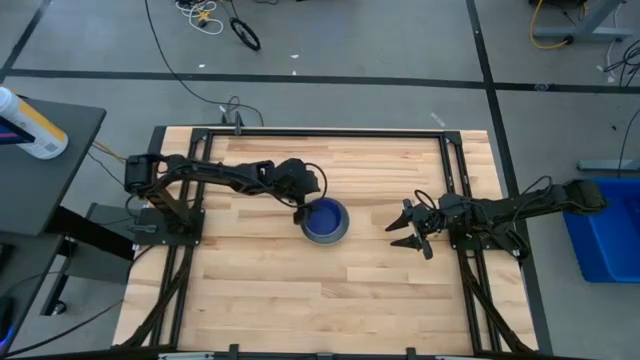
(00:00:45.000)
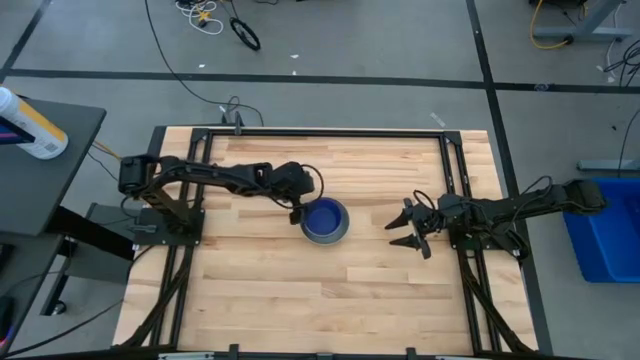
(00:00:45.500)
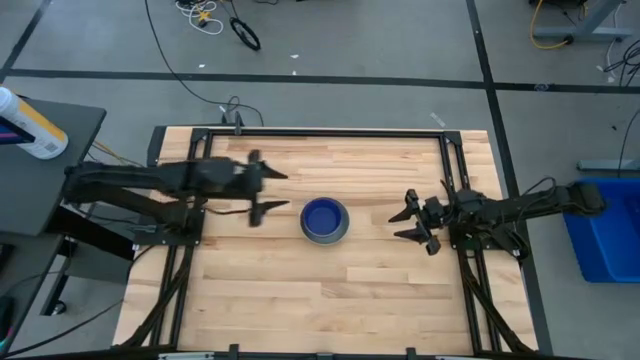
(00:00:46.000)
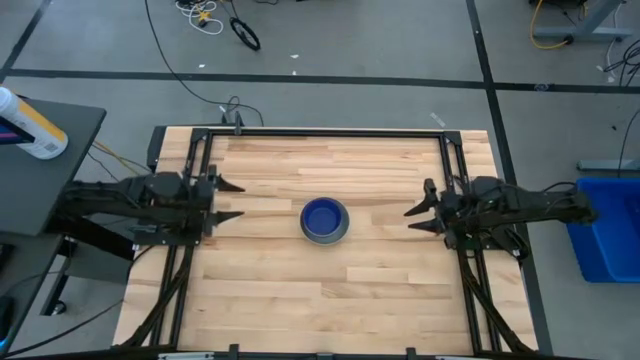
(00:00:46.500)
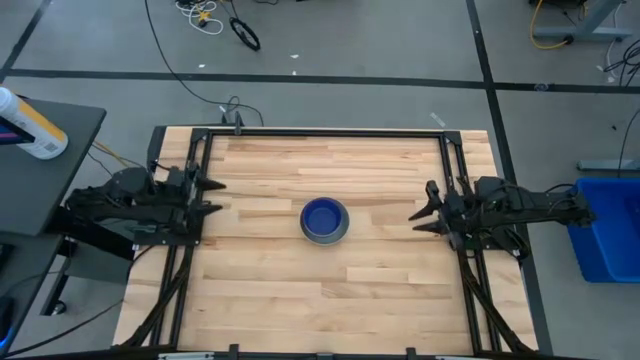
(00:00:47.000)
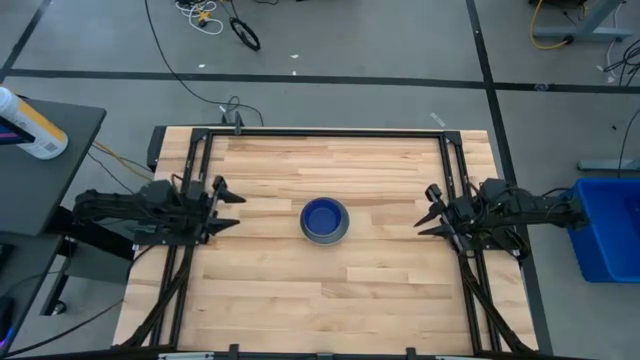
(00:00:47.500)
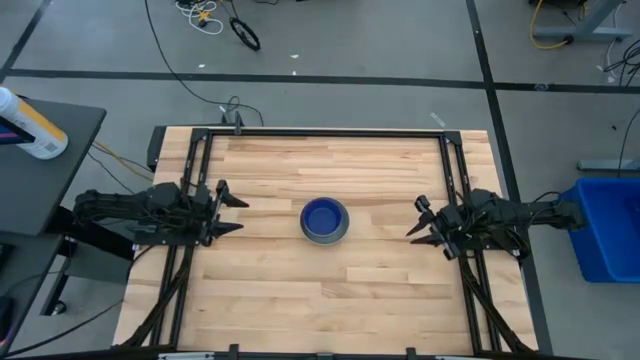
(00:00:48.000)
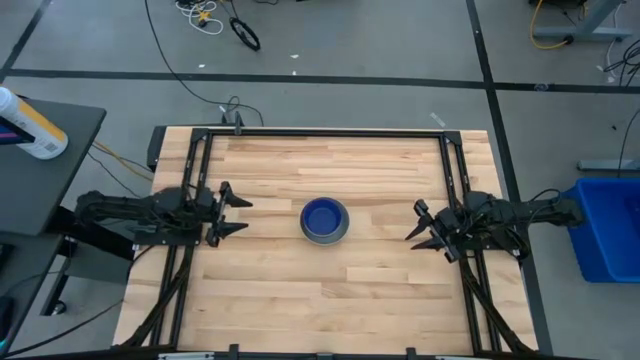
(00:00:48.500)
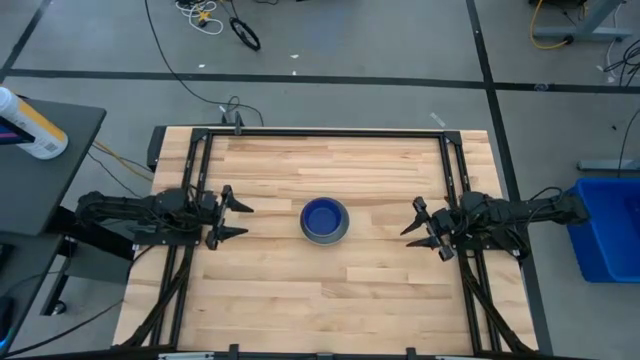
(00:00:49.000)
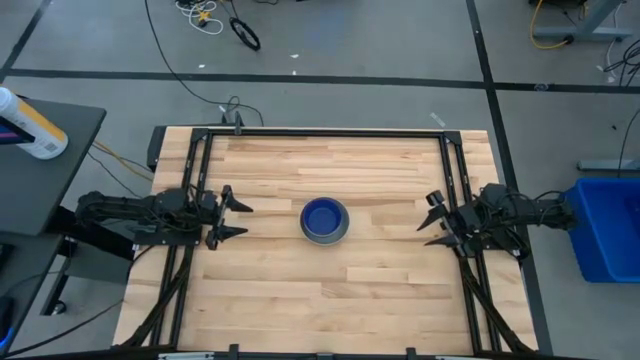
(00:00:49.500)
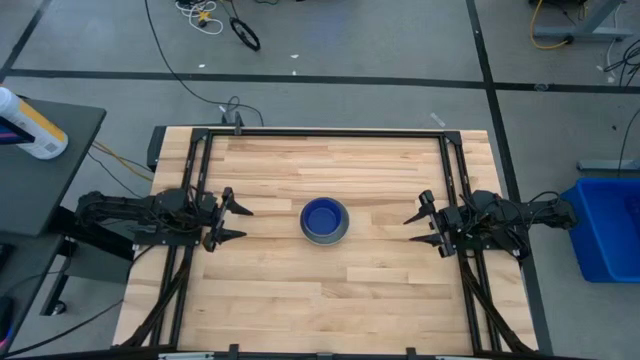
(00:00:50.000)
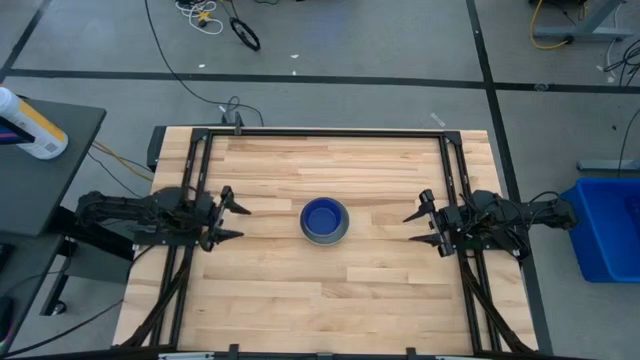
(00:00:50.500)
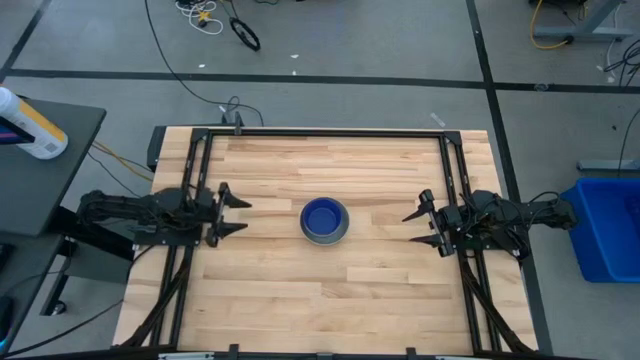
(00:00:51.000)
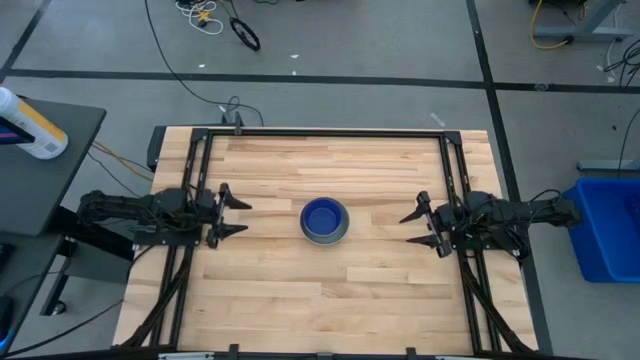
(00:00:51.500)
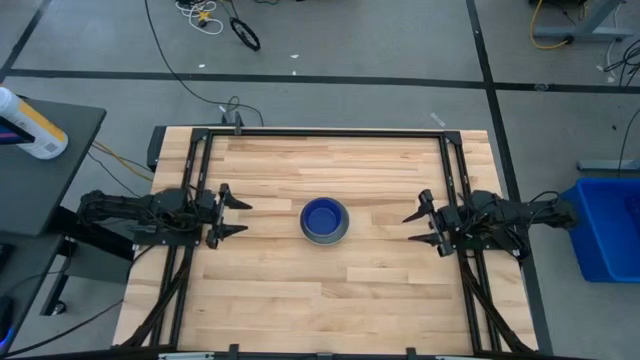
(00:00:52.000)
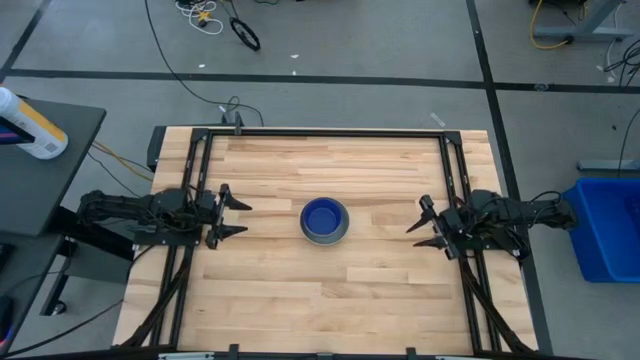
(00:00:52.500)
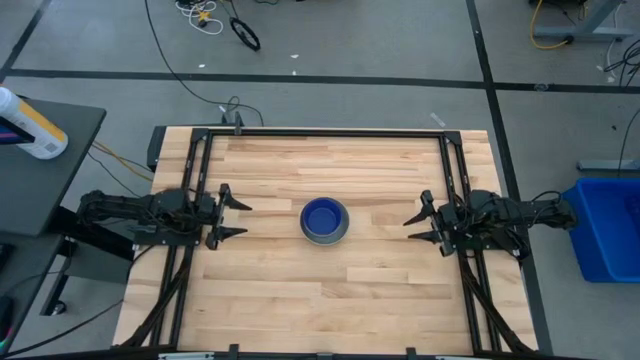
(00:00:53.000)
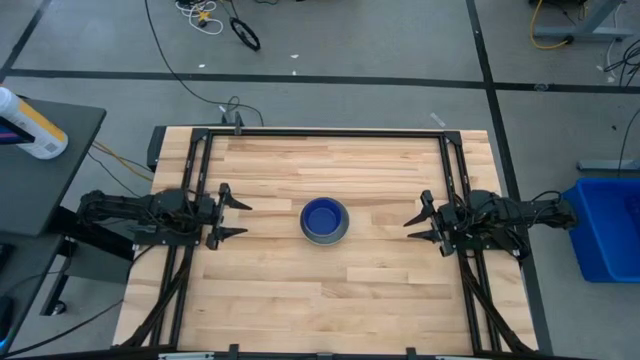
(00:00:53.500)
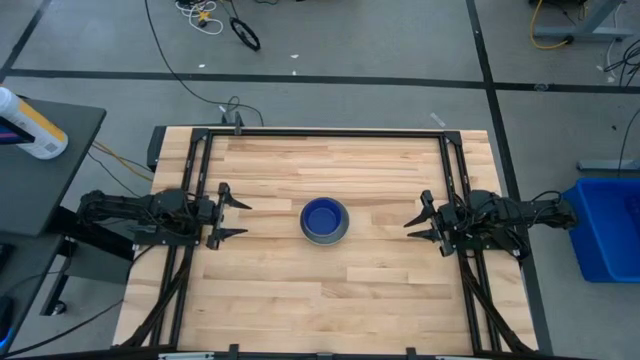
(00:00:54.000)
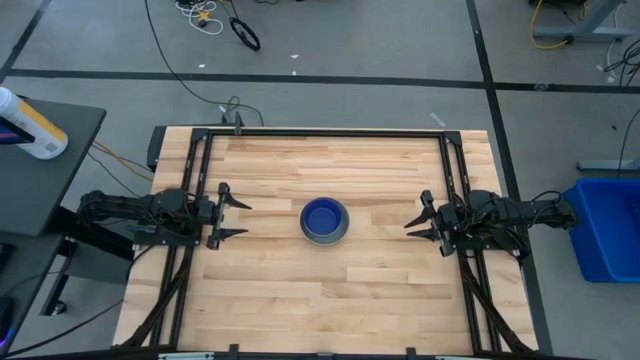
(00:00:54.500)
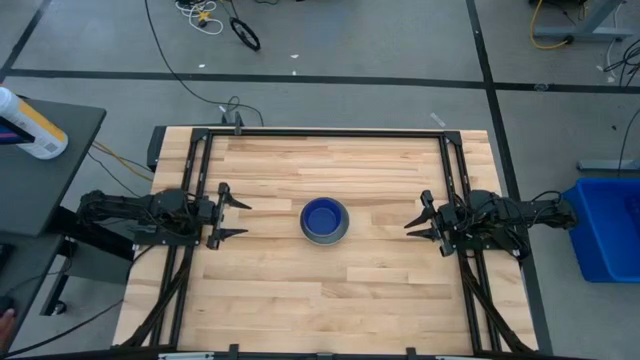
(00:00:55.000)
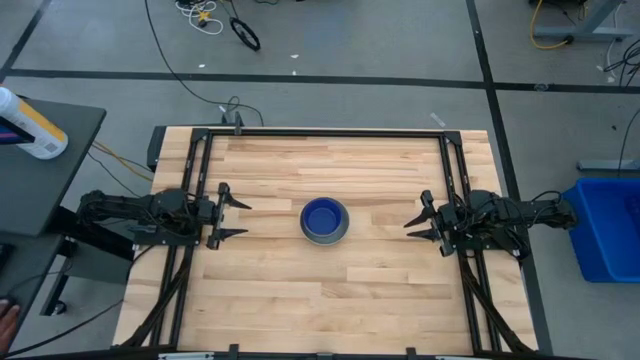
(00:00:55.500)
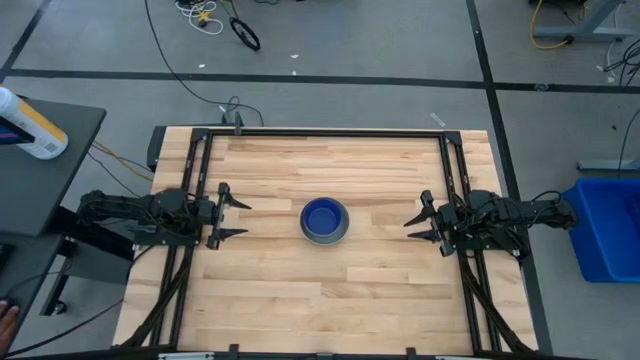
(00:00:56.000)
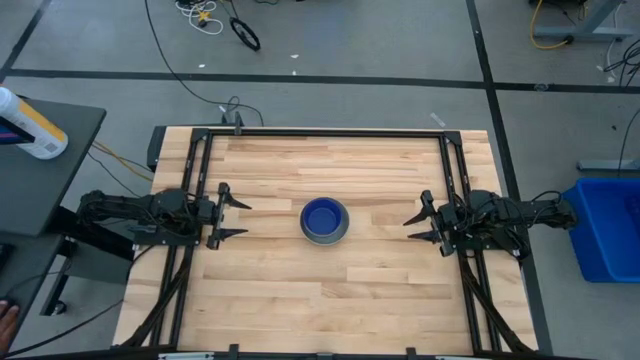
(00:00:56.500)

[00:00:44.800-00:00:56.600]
Return to Home Position

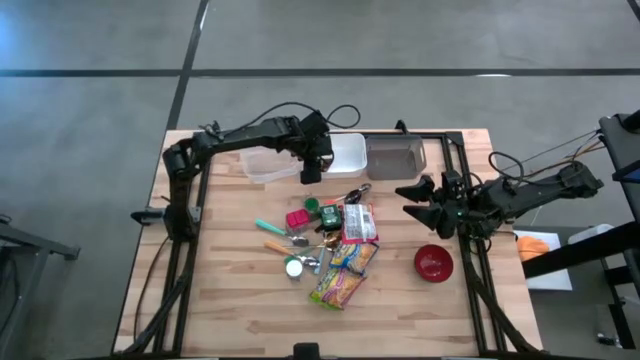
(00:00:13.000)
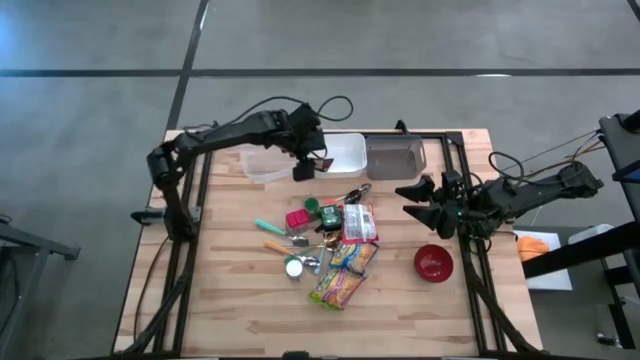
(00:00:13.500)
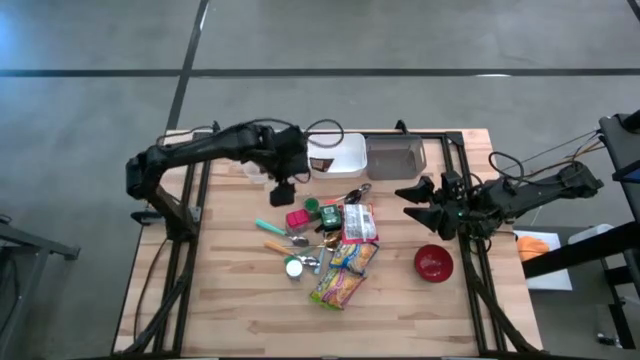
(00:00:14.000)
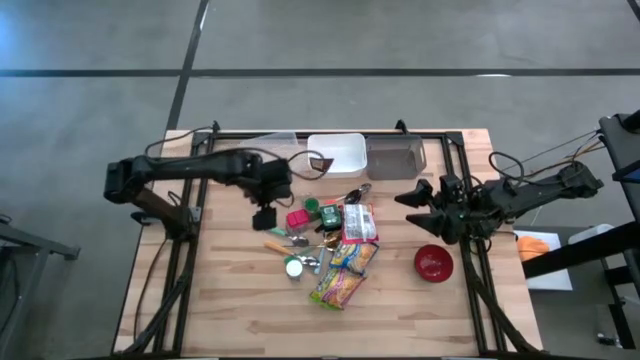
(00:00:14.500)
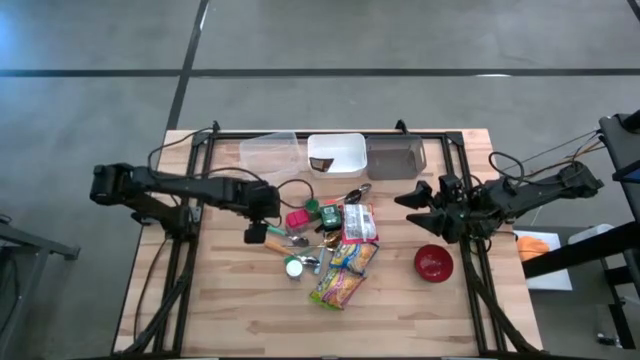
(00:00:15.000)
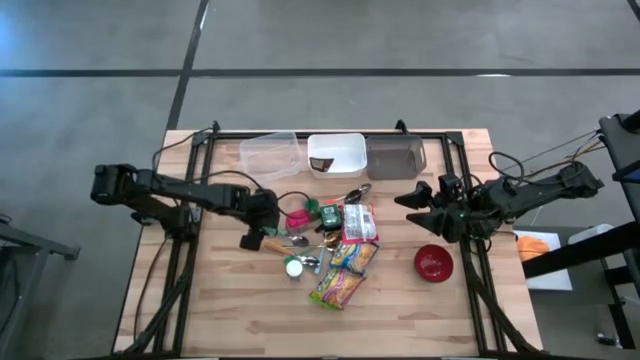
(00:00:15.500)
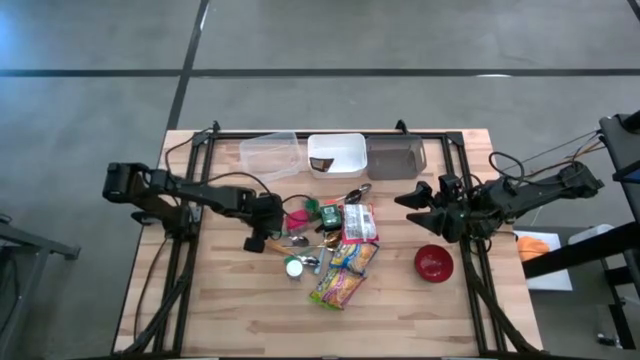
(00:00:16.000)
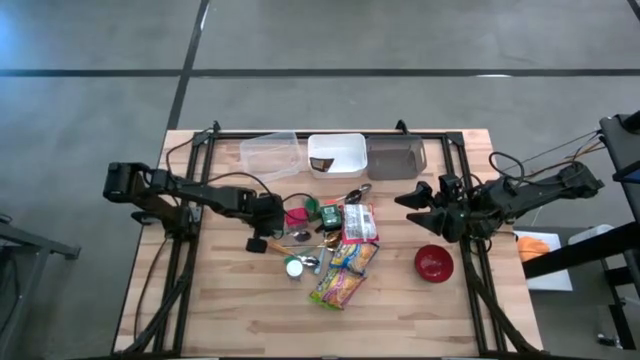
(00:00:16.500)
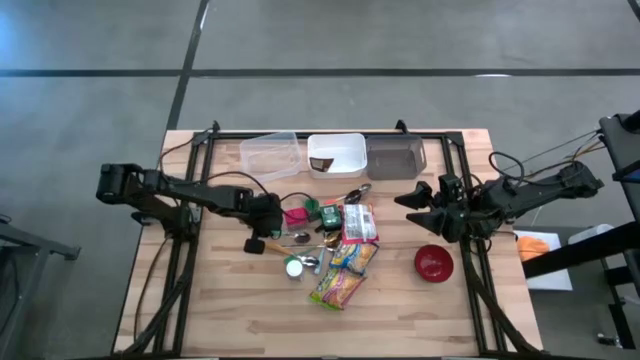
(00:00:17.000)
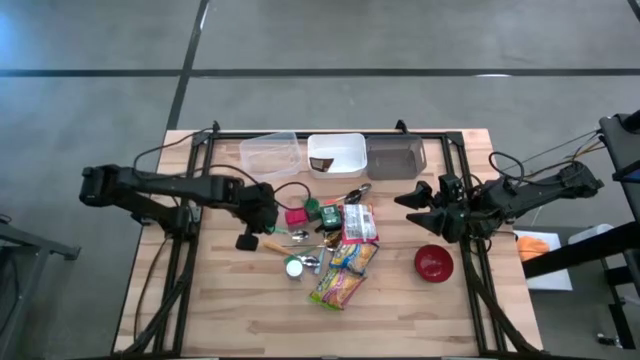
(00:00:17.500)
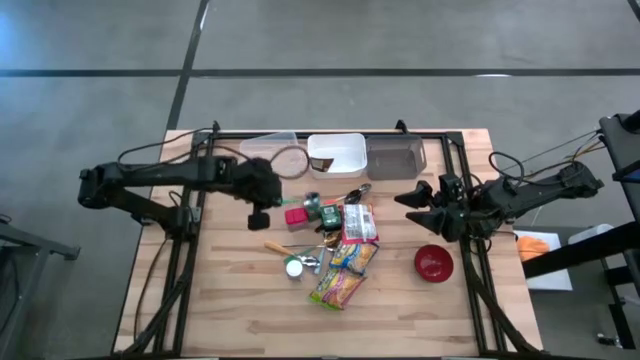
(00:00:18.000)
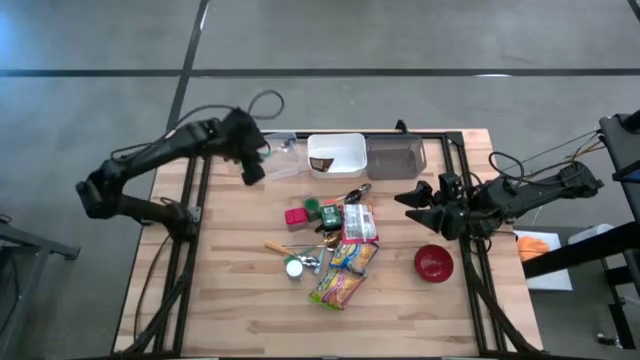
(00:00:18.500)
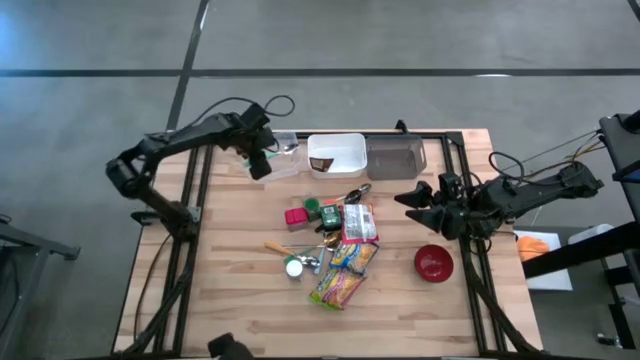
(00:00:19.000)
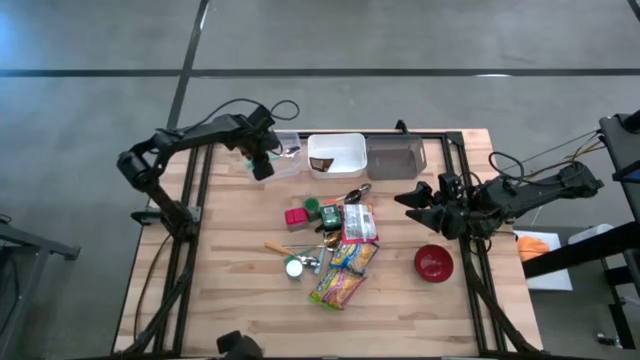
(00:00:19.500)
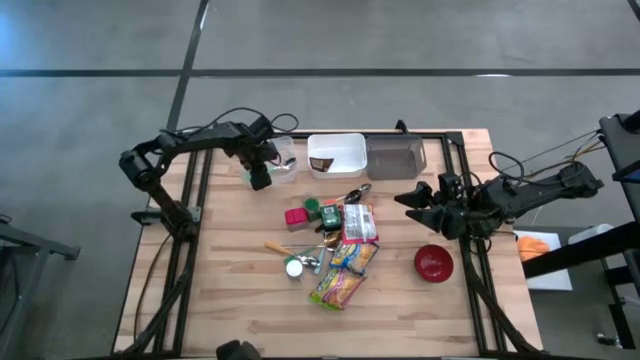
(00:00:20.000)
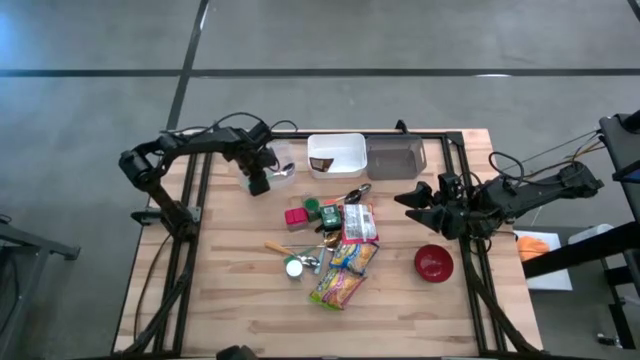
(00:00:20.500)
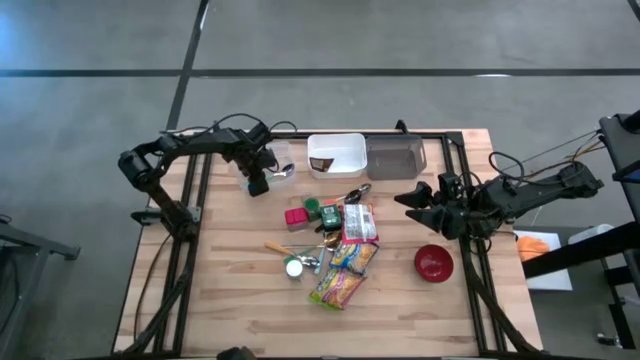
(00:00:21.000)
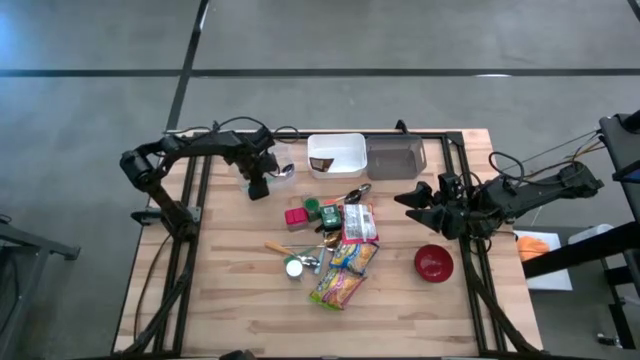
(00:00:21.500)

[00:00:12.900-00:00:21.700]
Put the light blue spoon into the transparent bin
